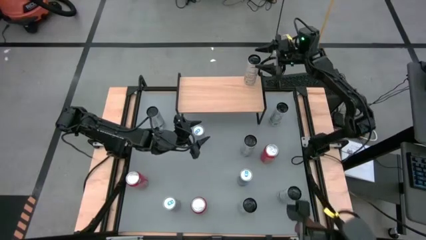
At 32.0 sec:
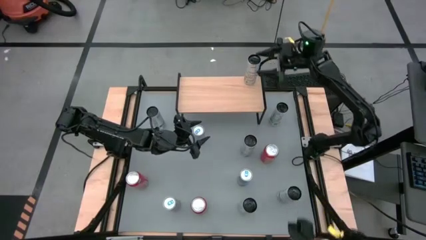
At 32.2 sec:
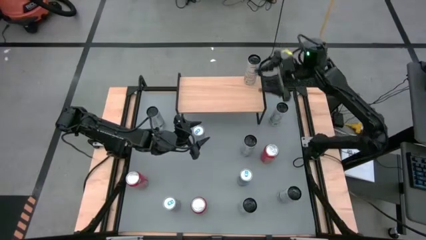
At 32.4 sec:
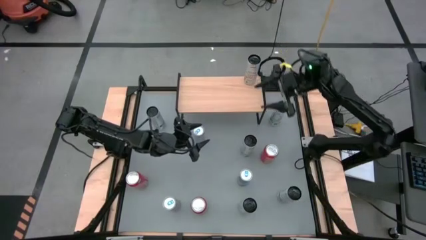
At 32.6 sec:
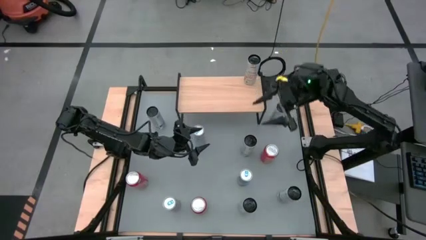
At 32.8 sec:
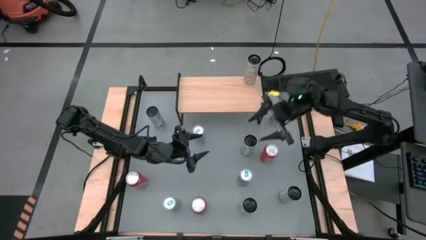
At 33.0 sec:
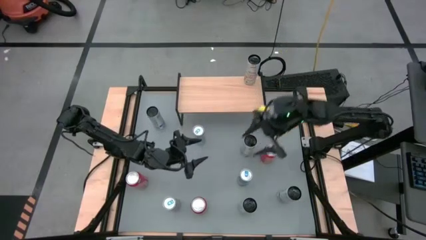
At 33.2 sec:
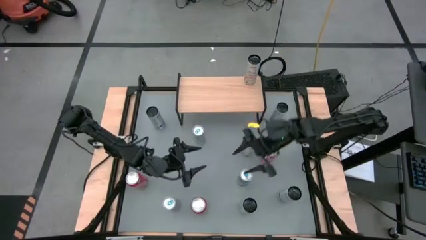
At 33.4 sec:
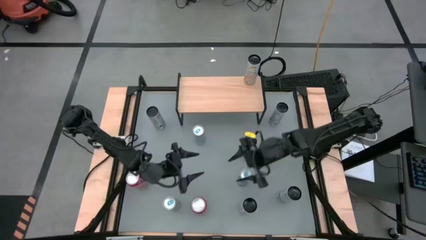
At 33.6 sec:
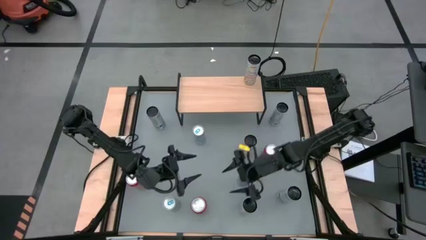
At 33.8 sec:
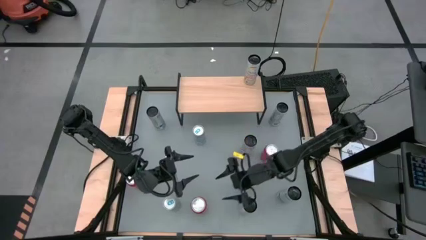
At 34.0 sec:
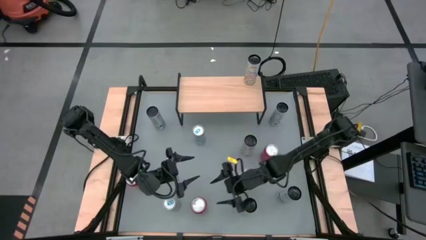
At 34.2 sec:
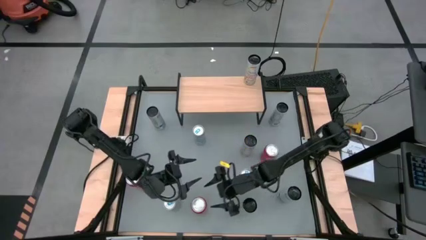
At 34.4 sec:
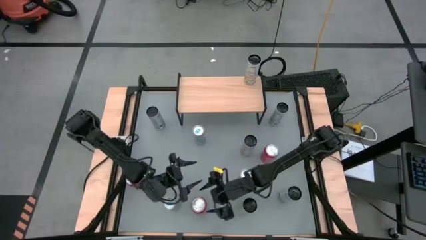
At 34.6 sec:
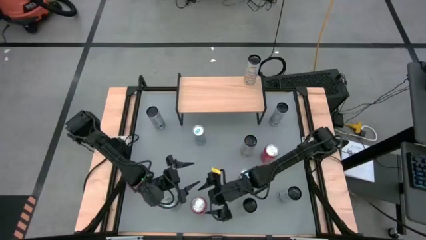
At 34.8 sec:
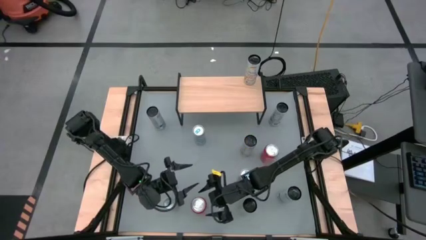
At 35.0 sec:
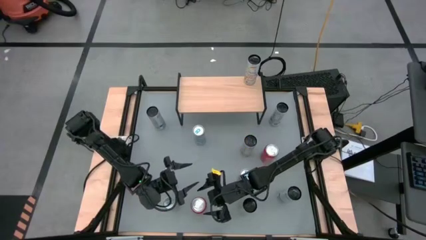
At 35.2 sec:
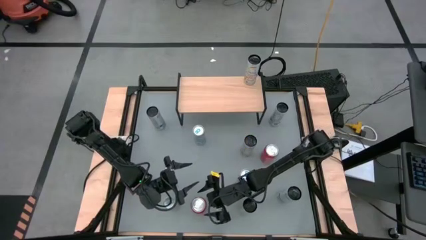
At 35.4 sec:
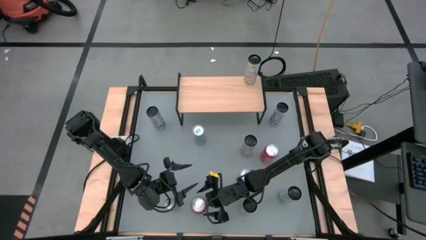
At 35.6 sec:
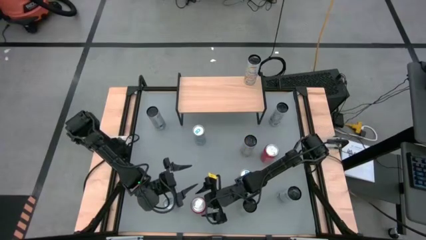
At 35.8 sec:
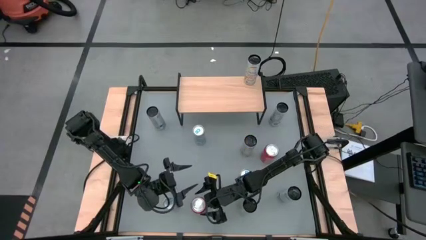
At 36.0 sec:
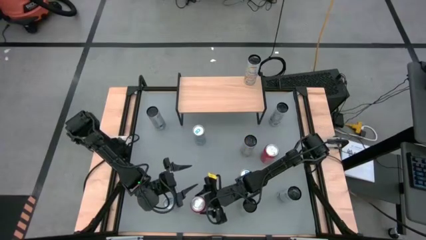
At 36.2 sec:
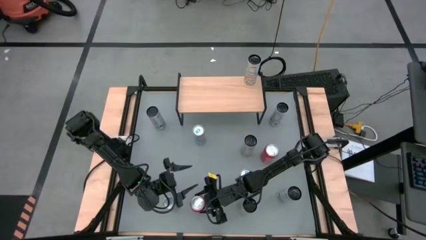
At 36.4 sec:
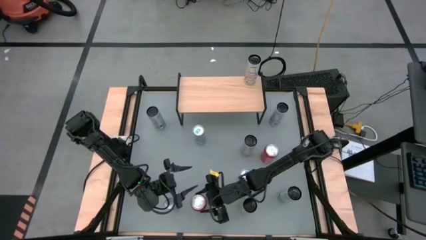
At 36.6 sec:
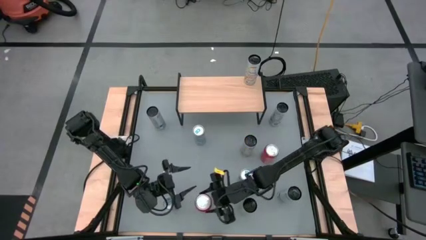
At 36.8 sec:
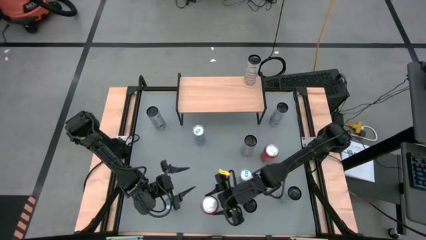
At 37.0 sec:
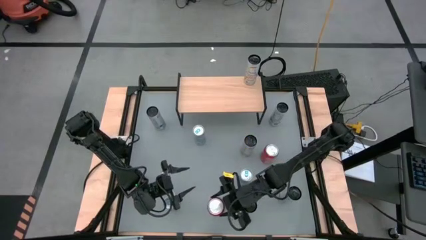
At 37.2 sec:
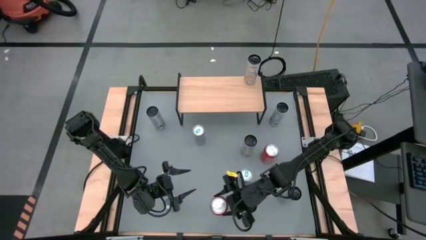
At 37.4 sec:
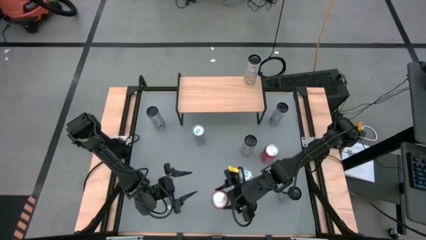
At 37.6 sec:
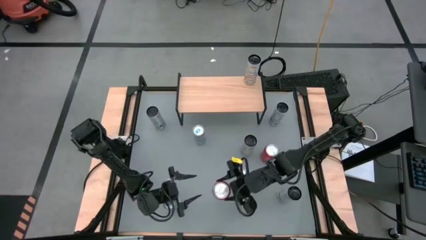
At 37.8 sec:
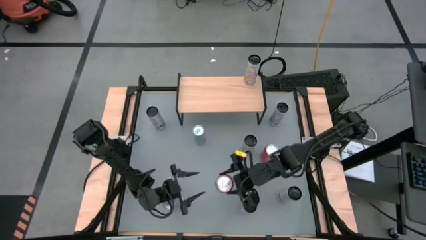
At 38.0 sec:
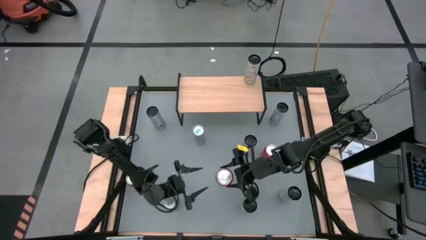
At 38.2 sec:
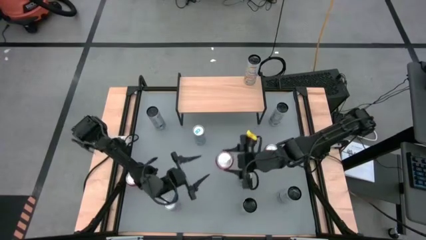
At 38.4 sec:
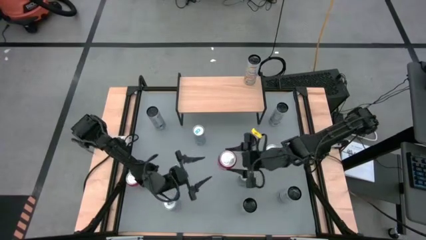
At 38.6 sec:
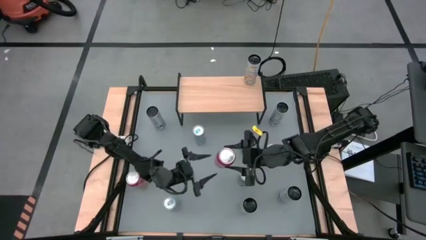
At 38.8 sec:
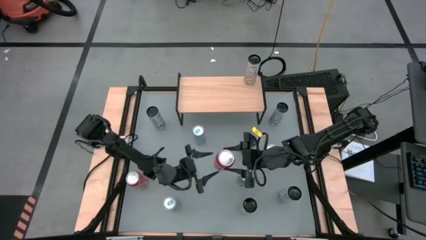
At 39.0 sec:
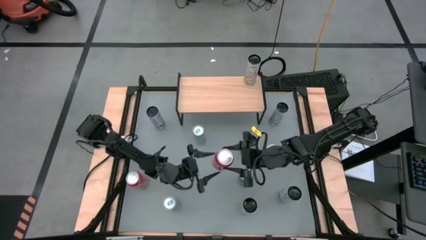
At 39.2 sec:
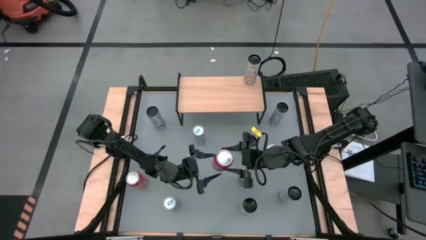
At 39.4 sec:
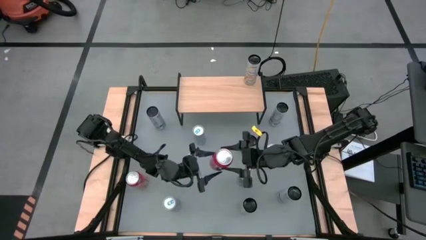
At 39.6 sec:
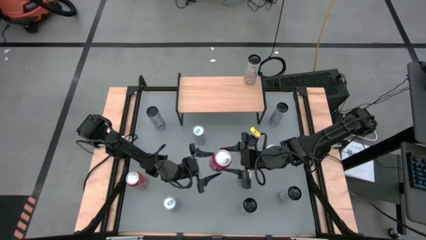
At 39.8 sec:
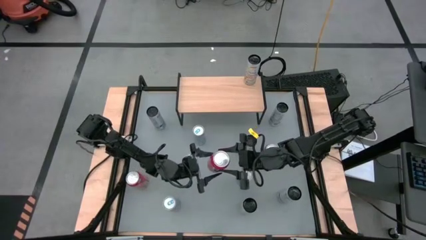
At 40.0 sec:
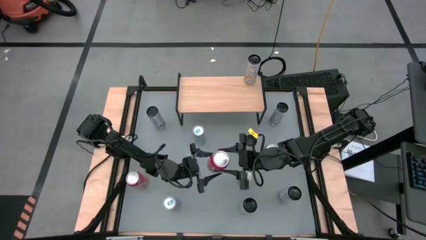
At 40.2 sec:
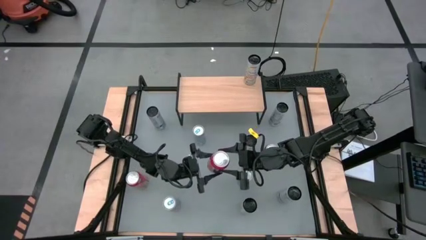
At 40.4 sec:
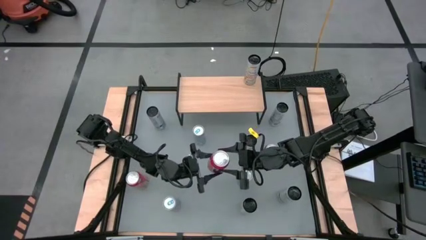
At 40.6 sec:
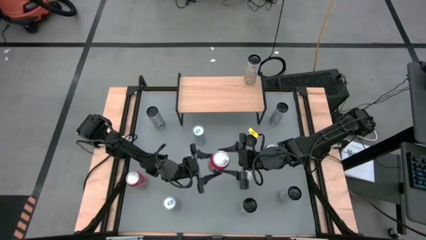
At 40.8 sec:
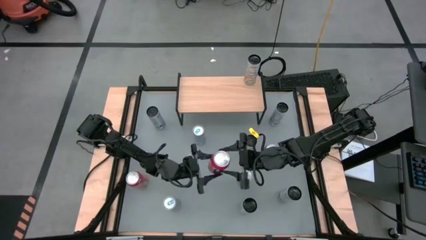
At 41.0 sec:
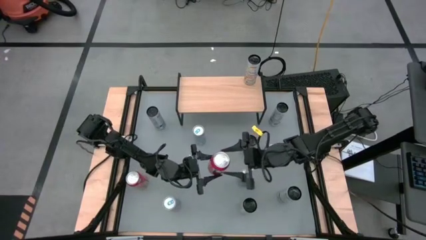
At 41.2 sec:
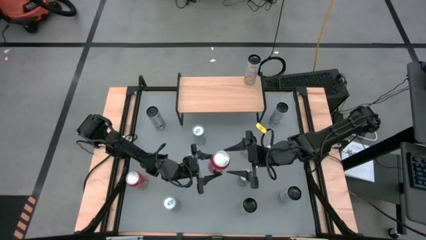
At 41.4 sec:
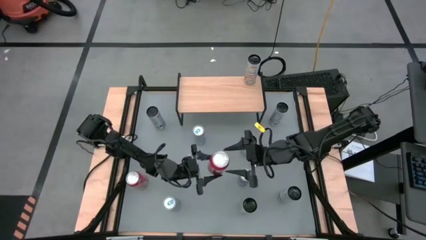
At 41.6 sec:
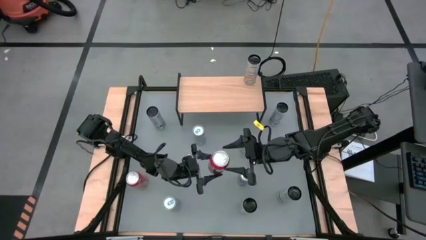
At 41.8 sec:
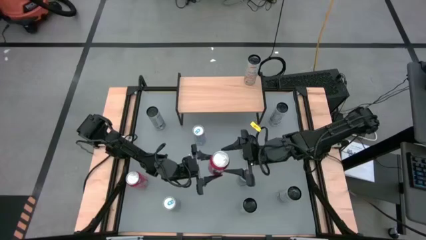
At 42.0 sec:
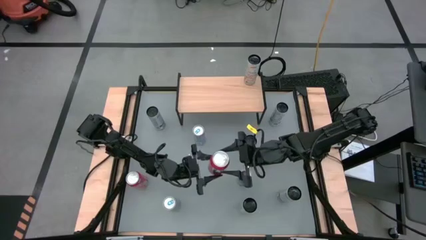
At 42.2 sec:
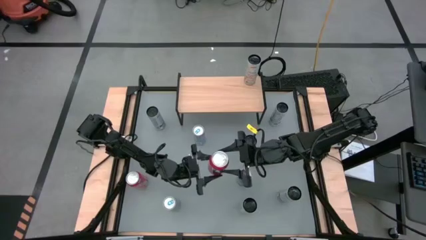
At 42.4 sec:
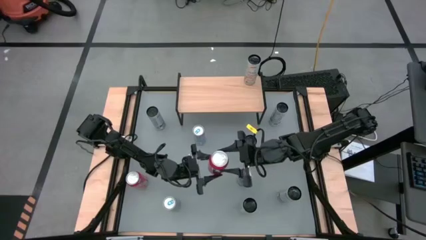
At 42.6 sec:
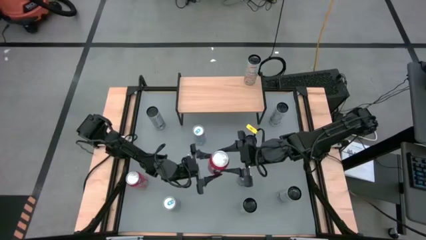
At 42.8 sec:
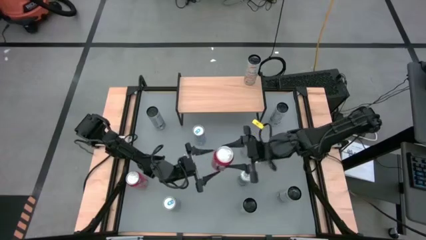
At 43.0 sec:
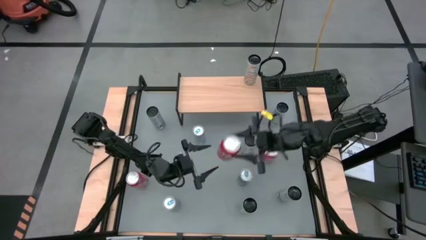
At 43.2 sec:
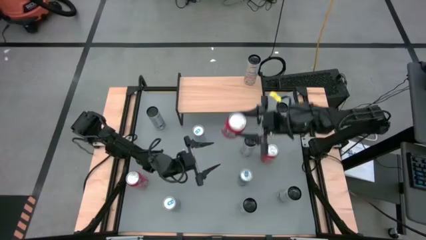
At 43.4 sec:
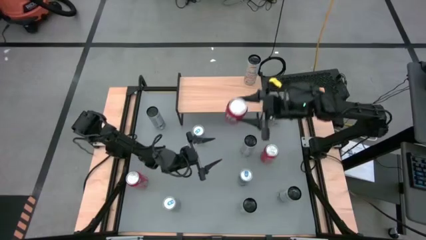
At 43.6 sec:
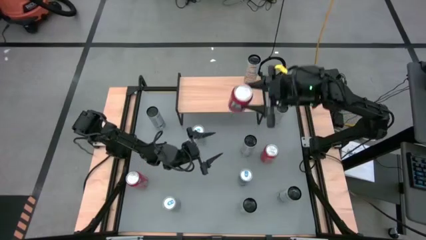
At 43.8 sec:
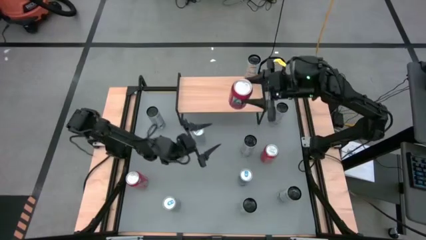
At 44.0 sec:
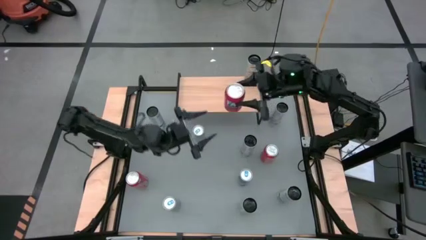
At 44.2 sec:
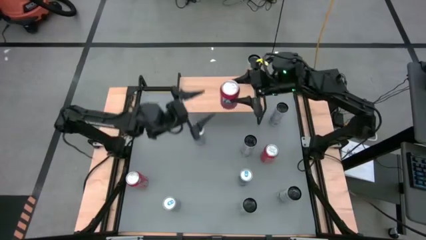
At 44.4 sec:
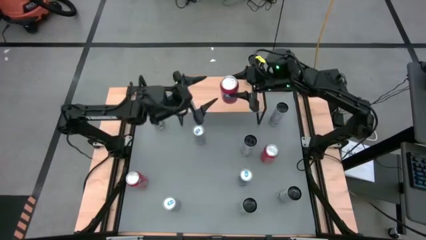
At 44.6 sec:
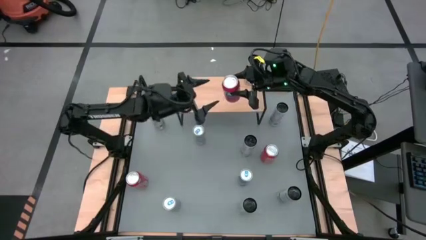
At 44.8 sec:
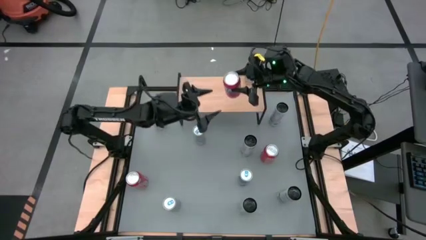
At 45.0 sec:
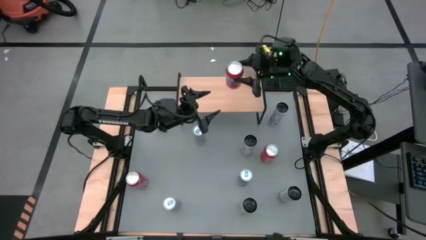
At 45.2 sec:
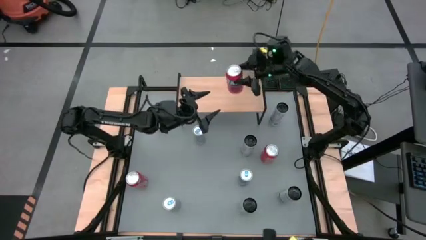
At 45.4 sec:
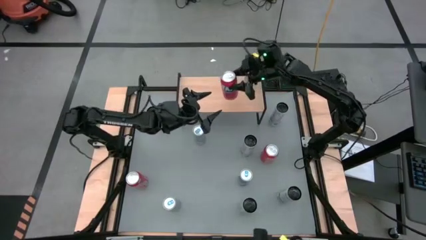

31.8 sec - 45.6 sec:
Task: Place canned beverage on shelf
Put the middle orange soda can on the shelf

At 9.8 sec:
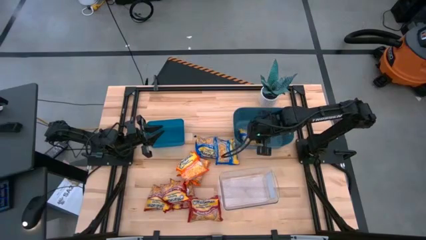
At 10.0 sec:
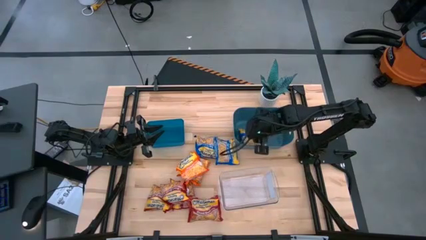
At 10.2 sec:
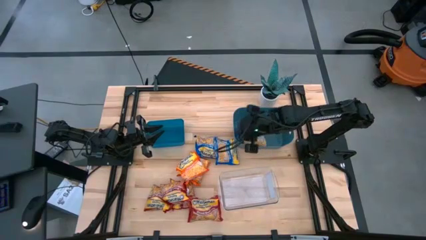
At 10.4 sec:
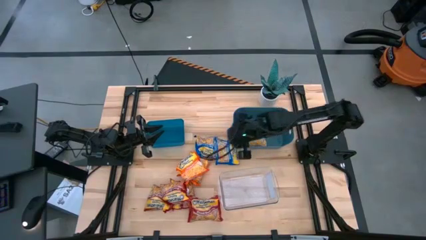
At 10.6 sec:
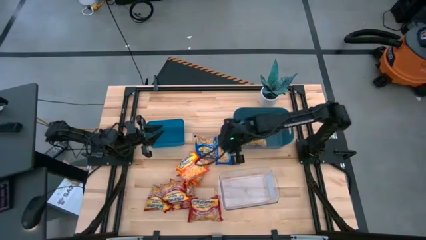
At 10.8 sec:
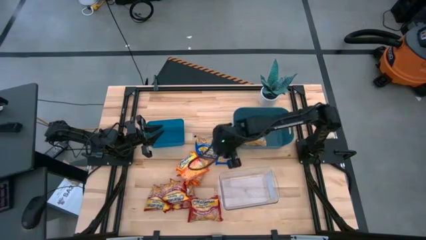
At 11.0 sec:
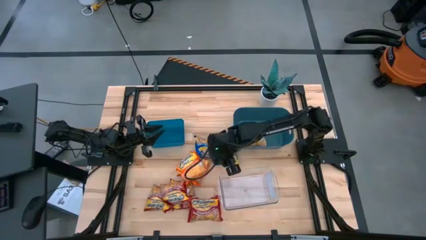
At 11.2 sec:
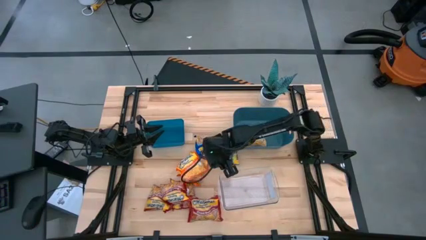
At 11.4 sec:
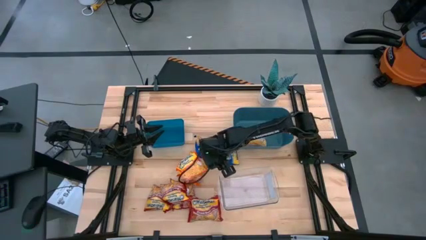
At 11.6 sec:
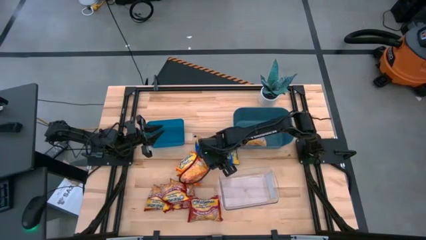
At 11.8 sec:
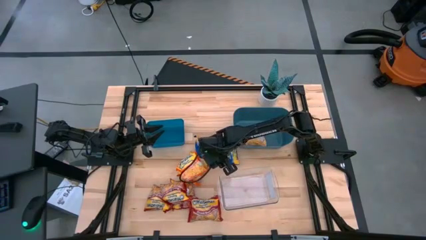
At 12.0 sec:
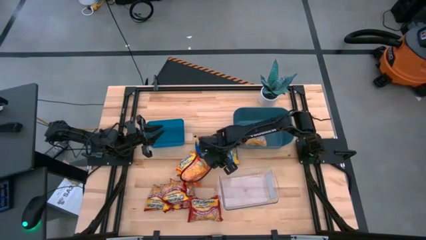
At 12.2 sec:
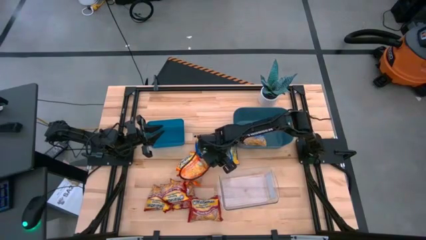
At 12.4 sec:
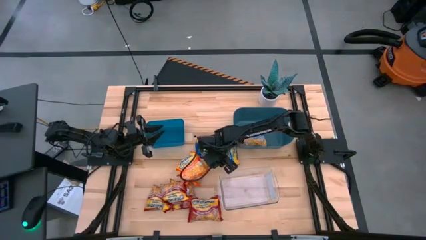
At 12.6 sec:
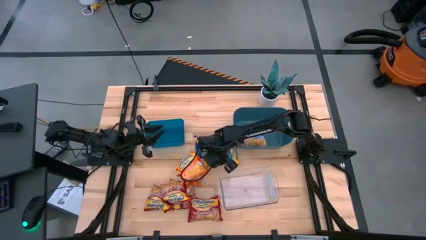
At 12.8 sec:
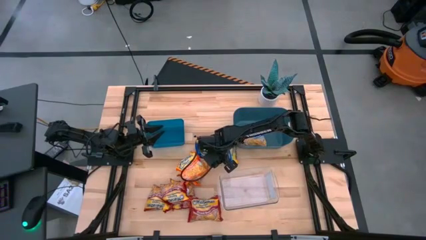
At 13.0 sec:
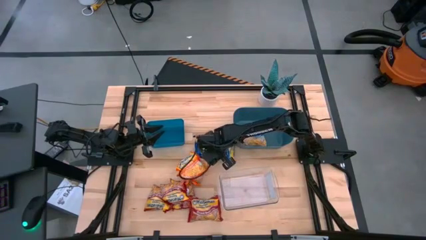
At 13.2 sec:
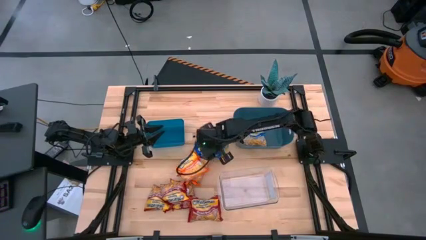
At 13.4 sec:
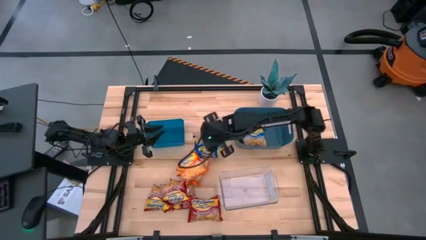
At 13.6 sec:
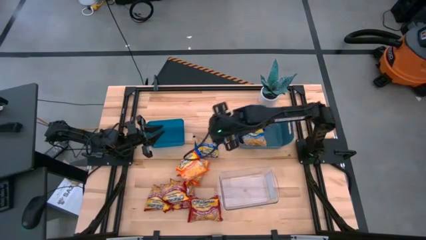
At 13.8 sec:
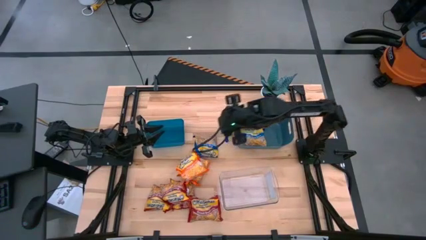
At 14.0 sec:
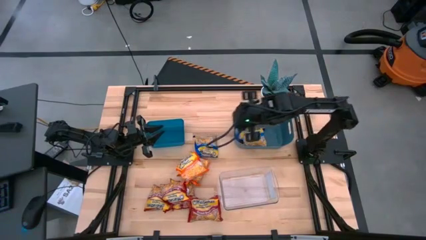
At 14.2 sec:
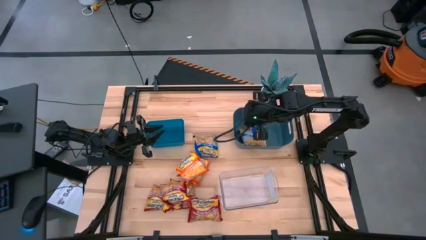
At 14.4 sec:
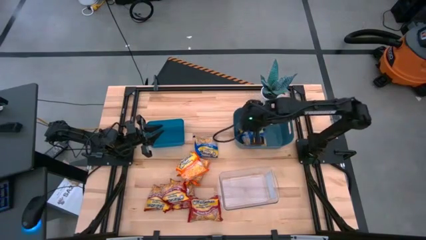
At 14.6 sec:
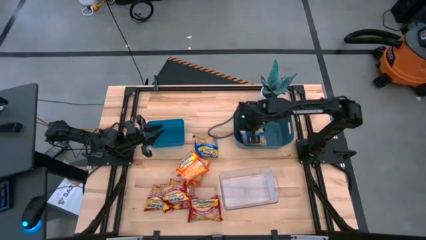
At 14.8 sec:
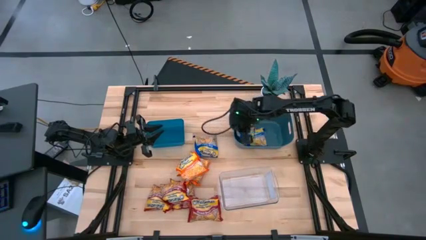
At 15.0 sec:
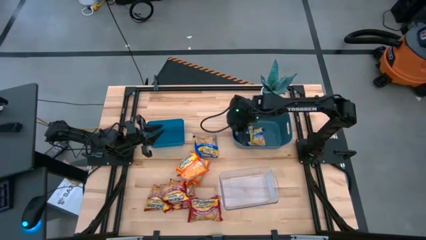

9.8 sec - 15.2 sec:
Task: Sort Maruchan noodles
Put the blue noodle pack into the dark blue bin
